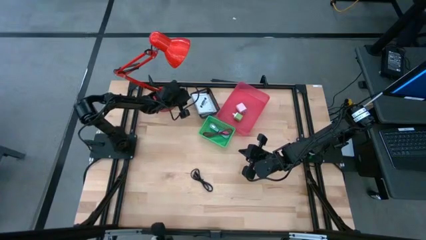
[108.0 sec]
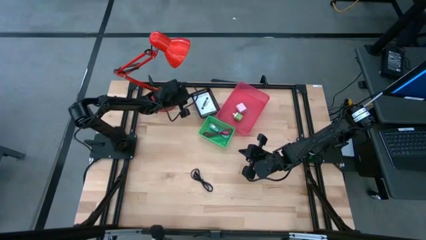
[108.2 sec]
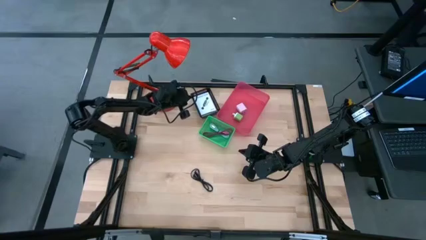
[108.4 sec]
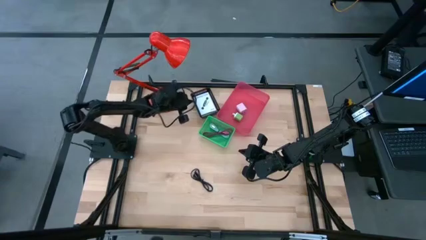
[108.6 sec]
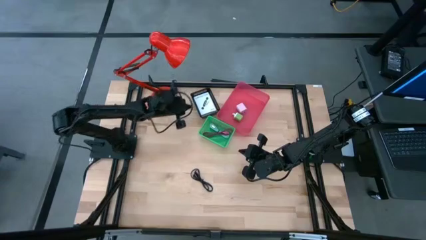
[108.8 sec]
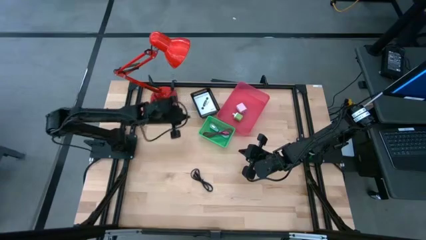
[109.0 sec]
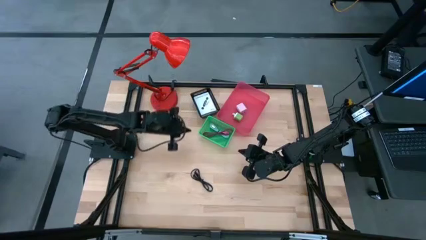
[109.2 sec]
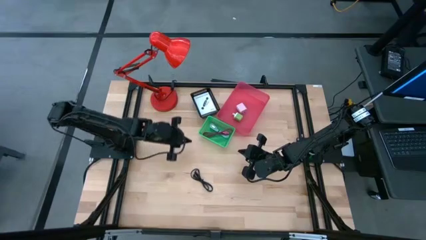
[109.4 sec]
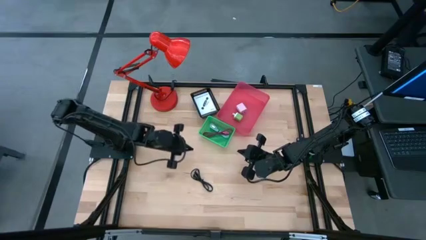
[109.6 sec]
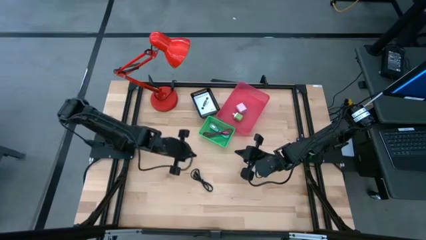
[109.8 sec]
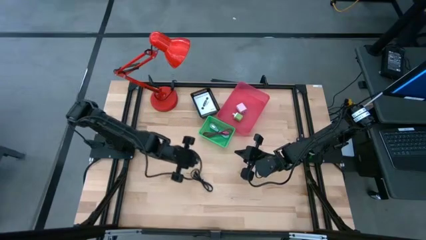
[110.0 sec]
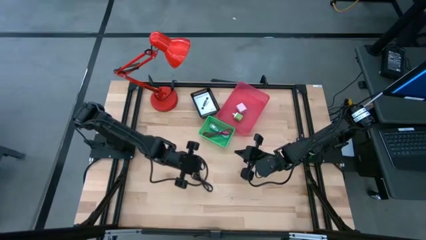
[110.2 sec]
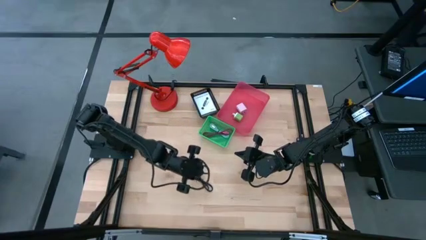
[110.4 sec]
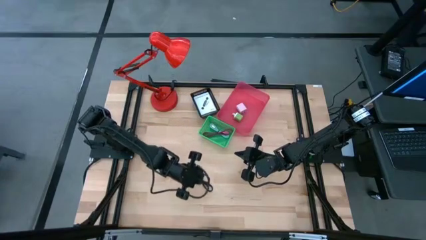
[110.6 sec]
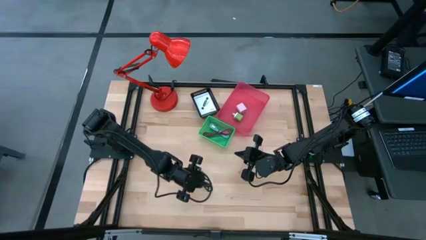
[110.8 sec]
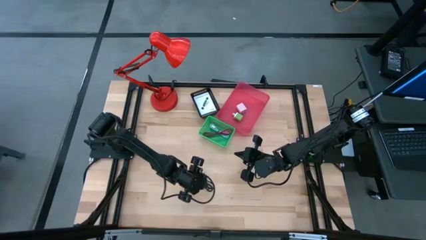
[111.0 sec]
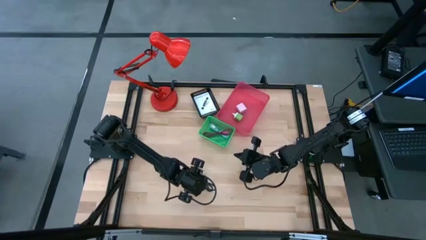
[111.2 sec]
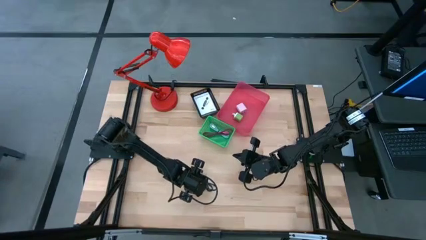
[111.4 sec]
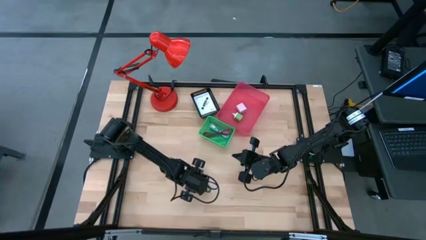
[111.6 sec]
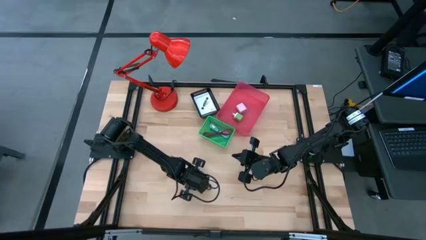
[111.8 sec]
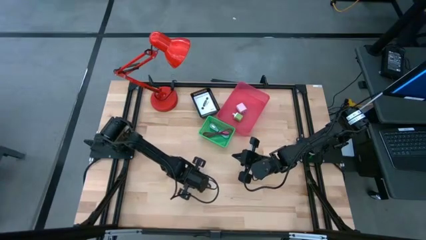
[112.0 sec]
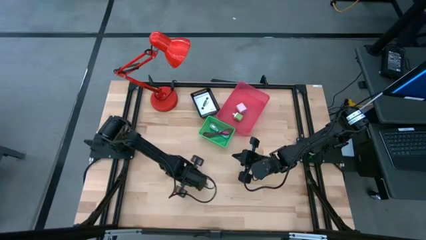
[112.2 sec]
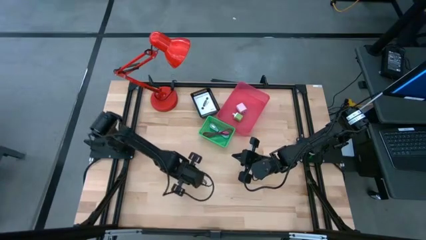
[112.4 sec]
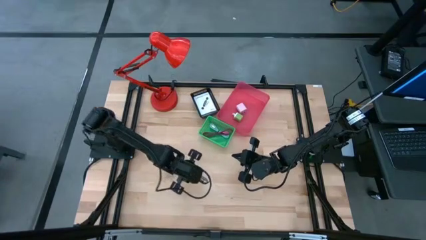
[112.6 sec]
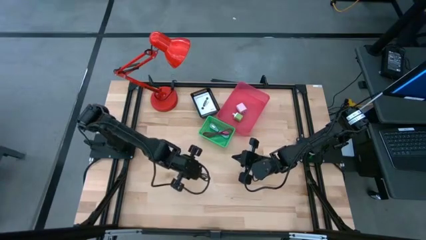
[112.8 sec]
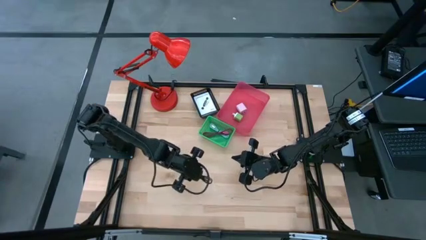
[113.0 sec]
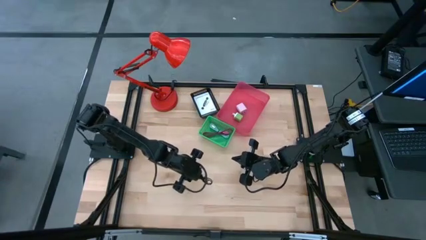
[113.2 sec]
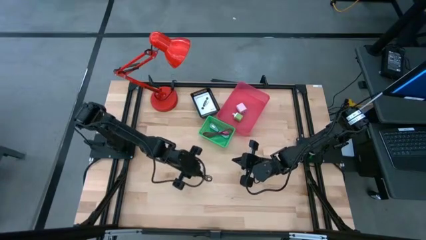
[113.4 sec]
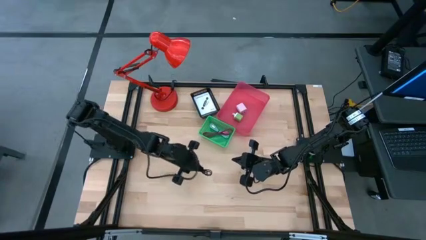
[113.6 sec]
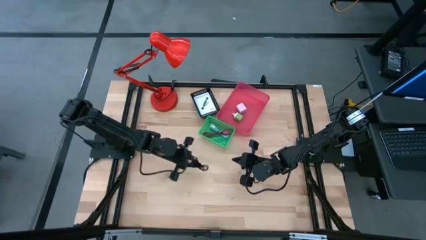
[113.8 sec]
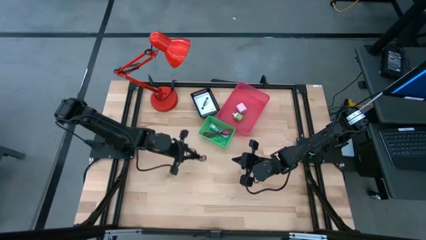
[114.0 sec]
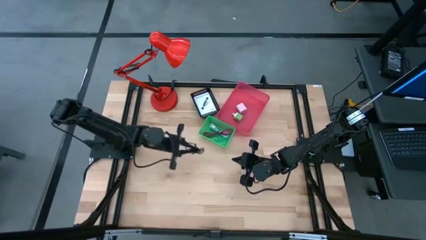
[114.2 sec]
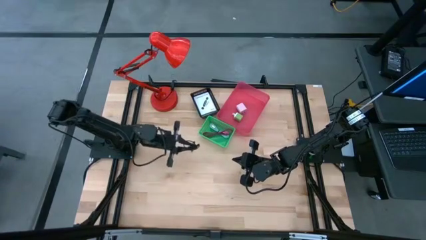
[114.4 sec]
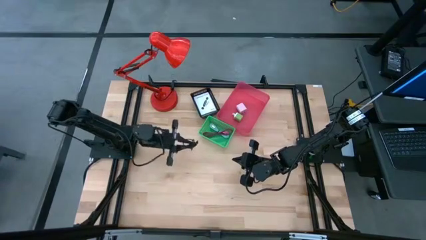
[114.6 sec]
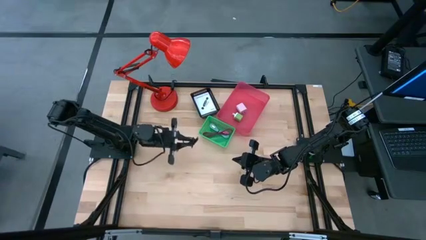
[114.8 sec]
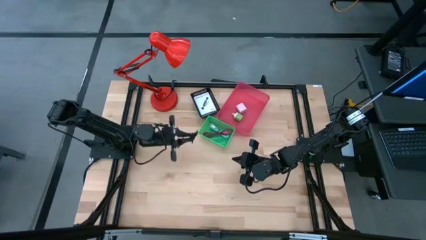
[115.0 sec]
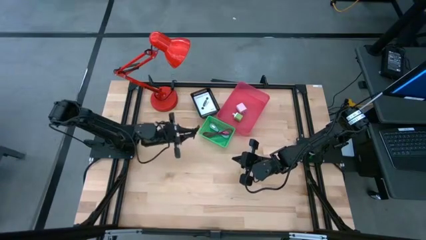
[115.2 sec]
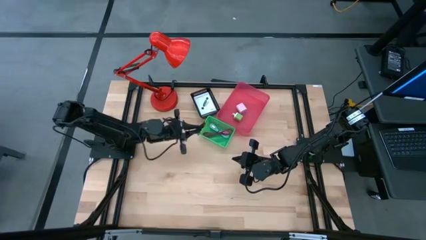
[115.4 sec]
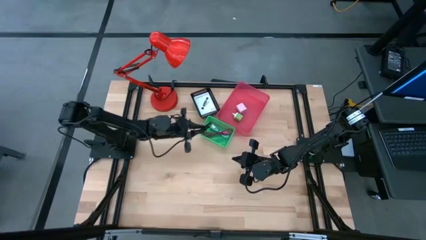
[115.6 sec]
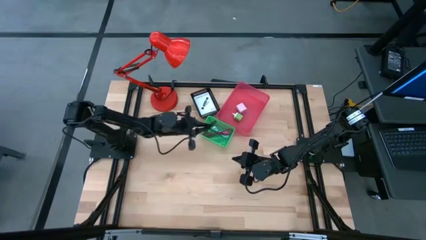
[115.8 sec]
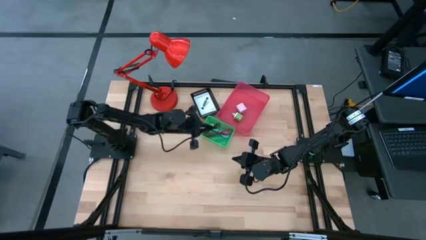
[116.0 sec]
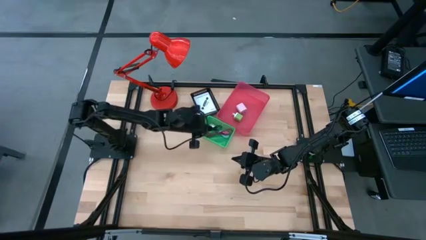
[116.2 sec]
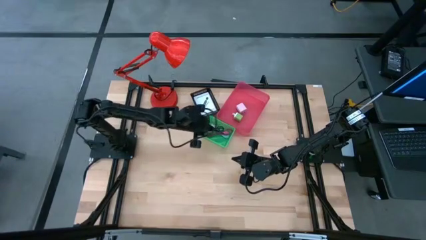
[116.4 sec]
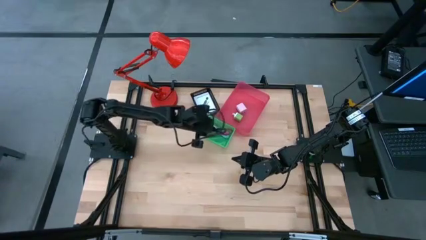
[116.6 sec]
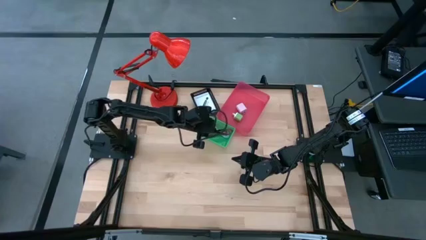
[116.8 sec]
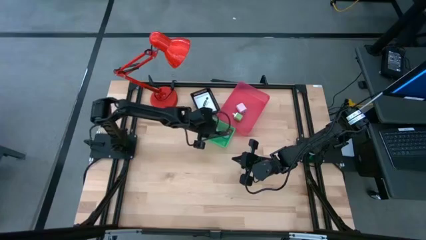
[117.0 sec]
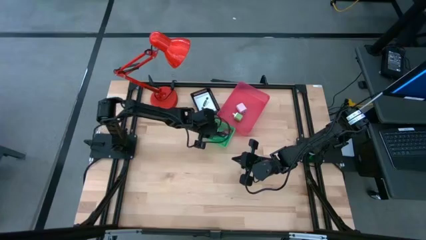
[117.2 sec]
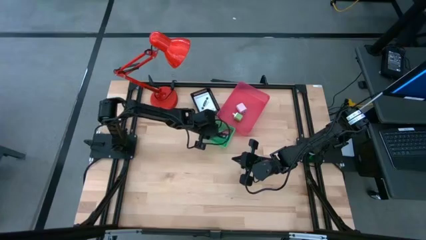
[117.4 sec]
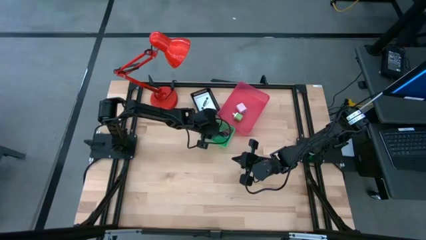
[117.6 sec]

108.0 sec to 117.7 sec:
Task: Pick and place items into bin
Put the black charger cable into the green bin

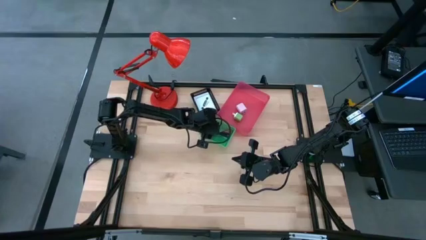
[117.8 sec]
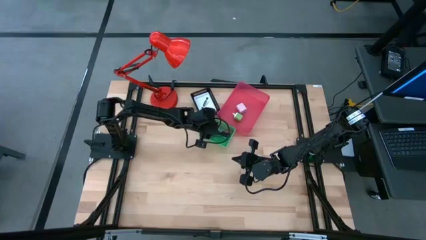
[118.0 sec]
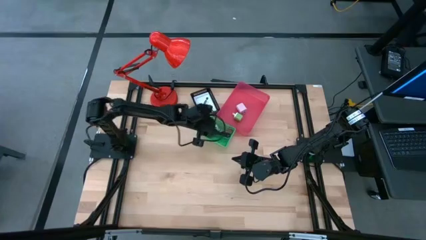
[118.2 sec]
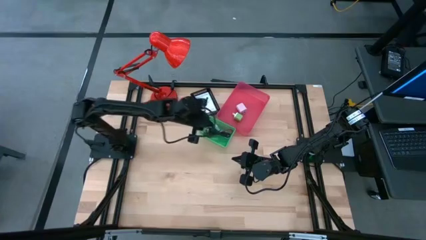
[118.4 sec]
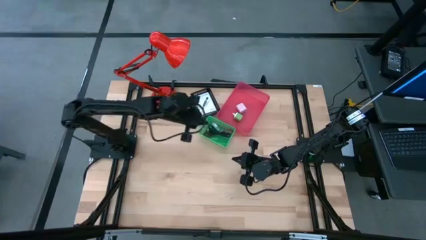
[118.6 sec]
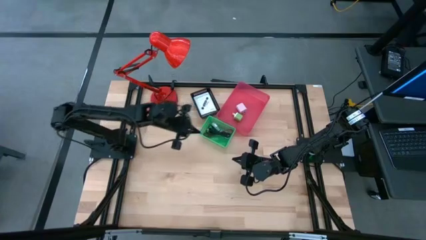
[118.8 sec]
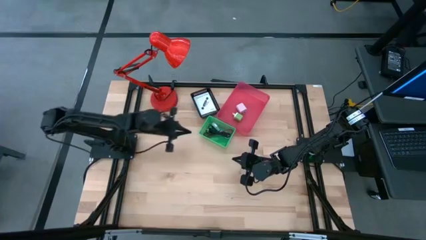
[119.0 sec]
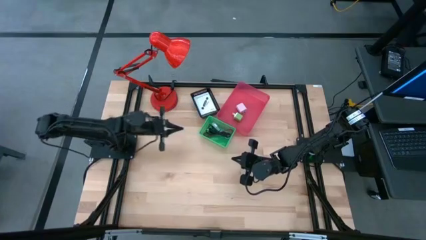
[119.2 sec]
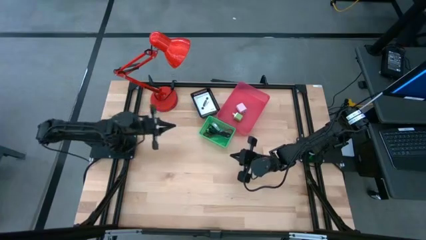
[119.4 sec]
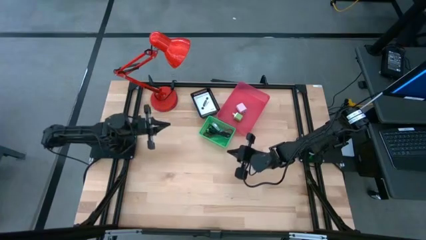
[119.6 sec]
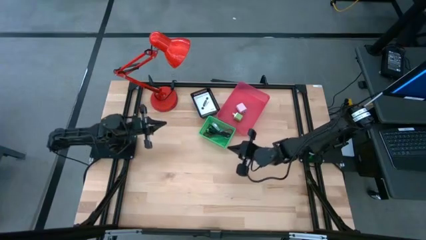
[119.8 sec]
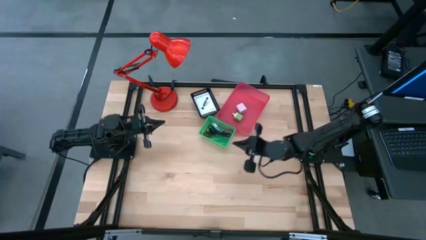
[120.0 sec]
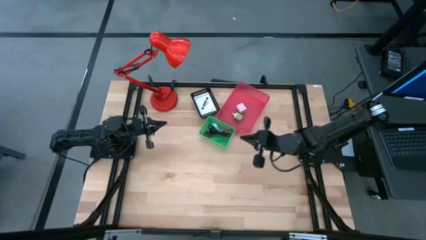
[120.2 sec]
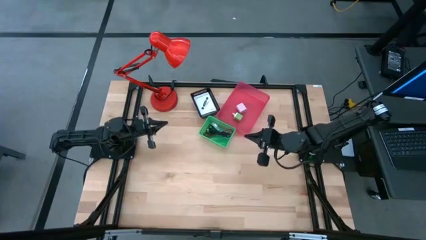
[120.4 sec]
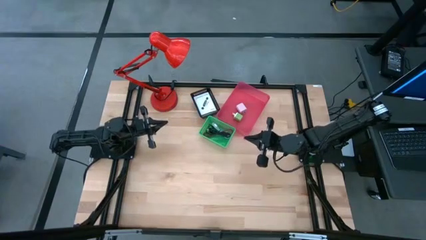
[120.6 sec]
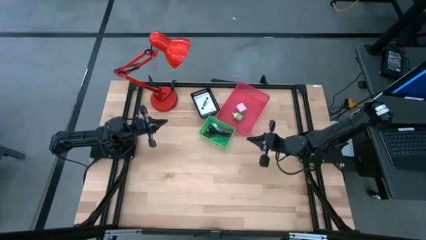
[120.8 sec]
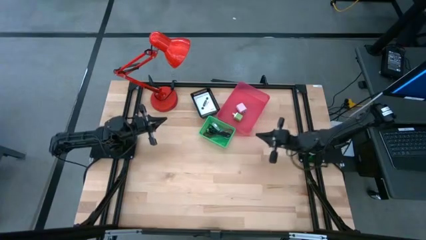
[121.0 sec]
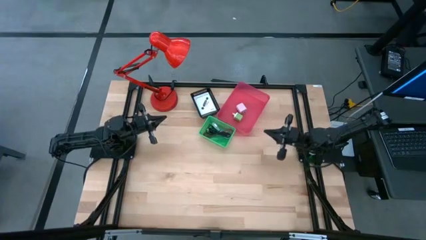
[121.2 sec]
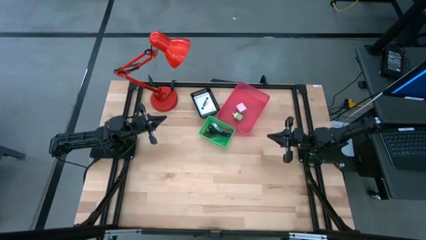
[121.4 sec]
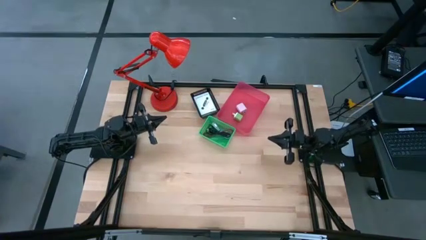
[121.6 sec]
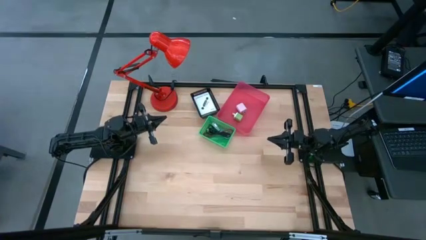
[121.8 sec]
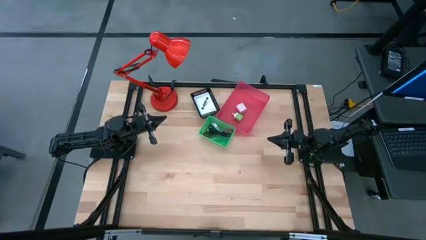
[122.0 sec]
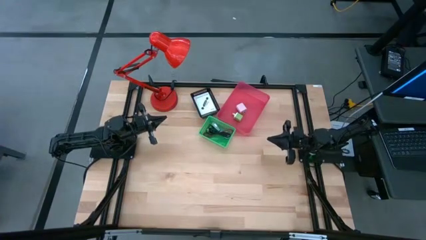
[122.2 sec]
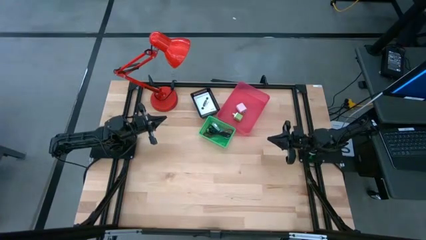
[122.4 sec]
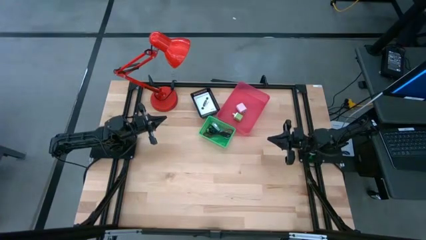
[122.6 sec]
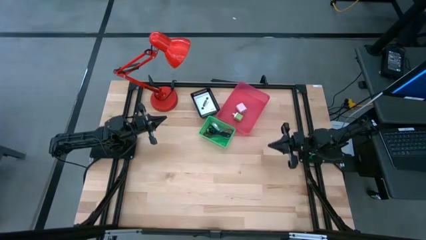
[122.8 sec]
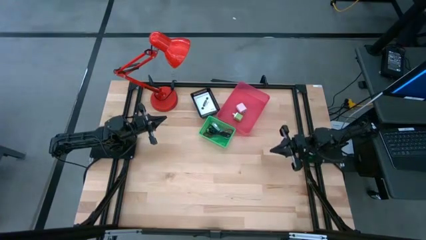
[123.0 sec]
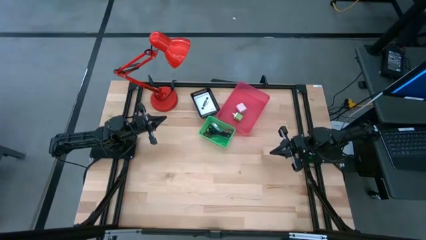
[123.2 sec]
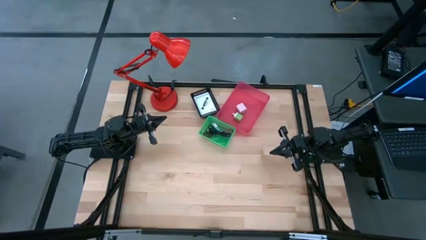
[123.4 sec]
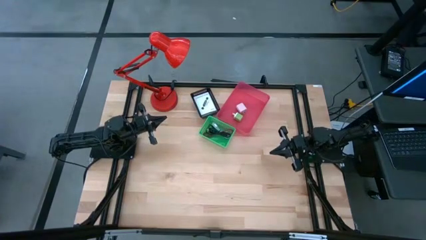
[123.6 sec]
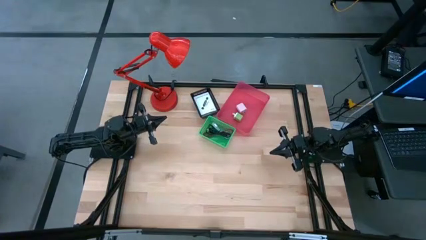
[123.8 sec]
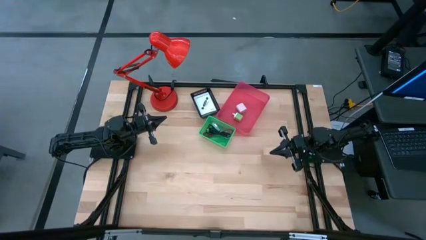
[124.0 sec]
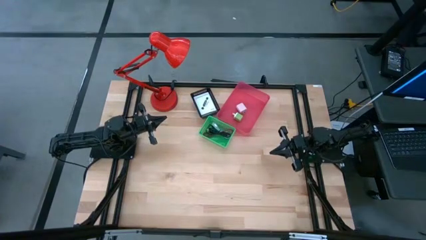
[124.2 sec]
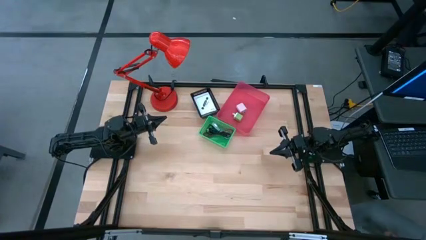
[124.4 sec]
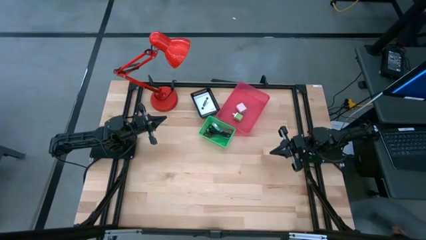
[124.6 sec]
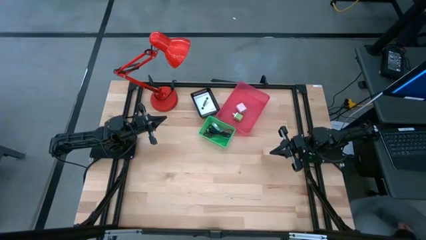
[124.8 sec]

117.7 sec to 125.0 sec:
Return to Home Position
